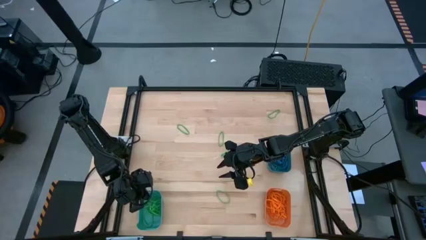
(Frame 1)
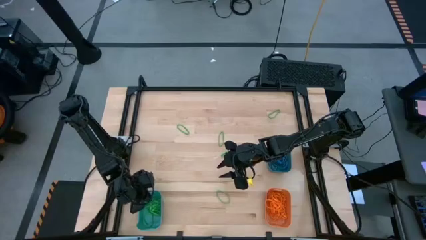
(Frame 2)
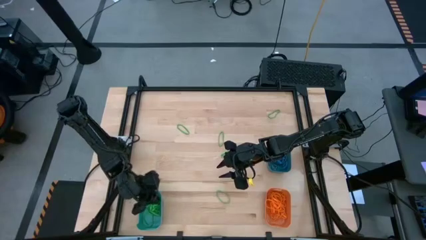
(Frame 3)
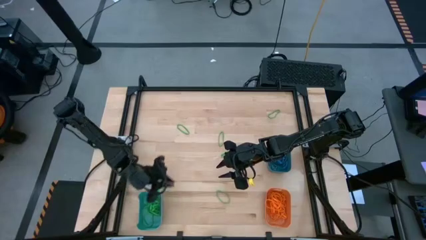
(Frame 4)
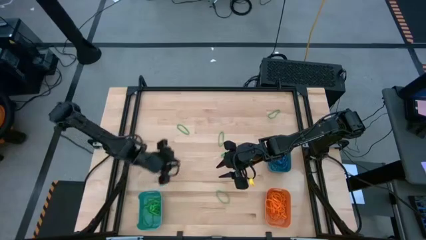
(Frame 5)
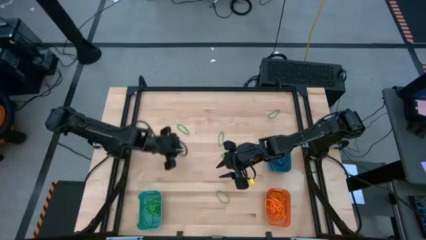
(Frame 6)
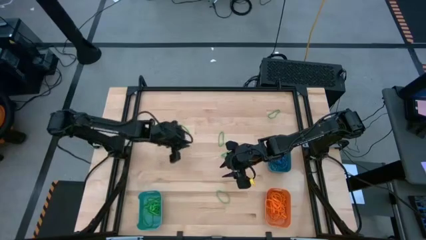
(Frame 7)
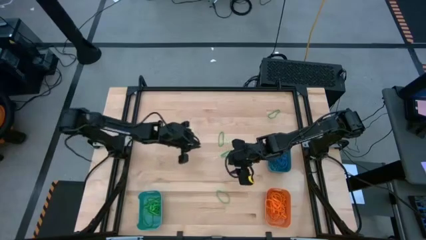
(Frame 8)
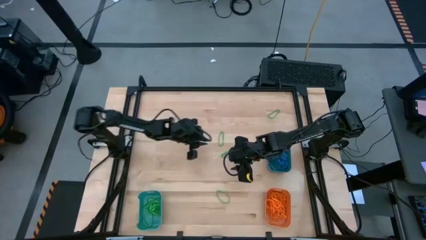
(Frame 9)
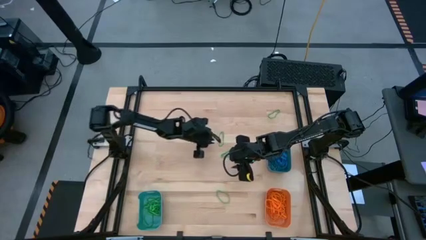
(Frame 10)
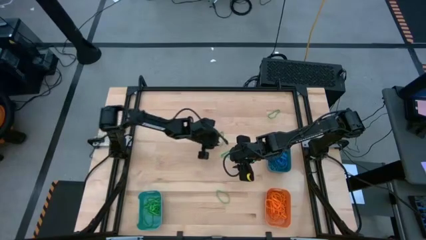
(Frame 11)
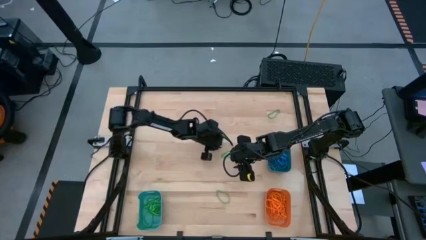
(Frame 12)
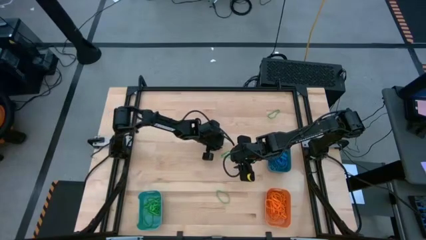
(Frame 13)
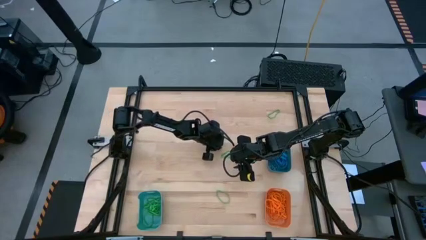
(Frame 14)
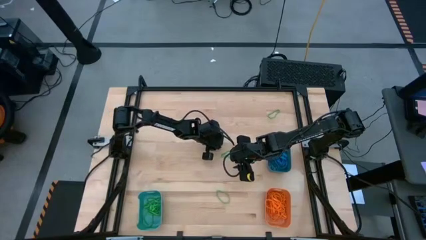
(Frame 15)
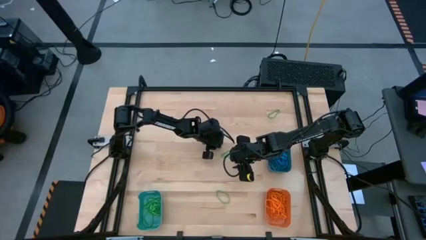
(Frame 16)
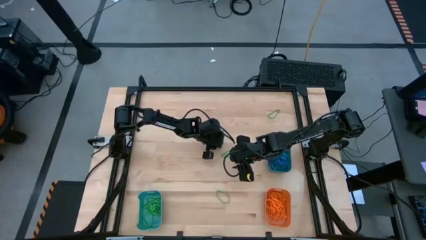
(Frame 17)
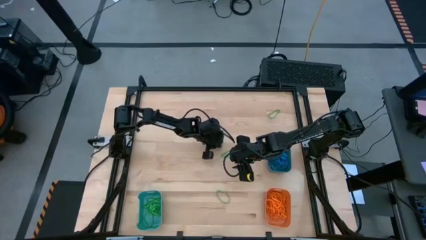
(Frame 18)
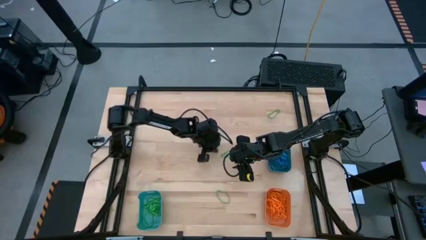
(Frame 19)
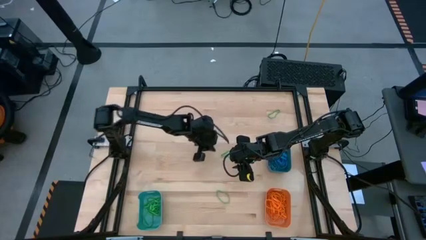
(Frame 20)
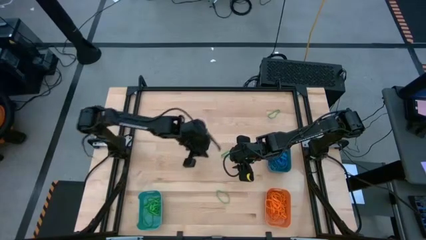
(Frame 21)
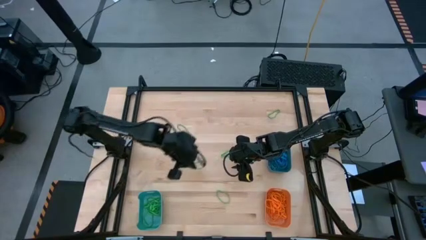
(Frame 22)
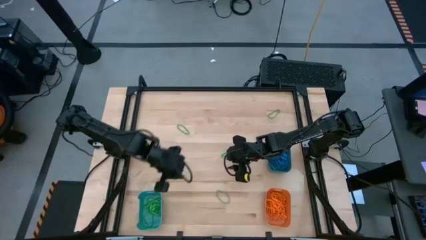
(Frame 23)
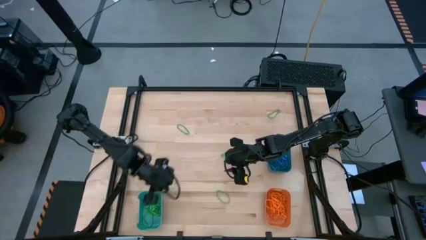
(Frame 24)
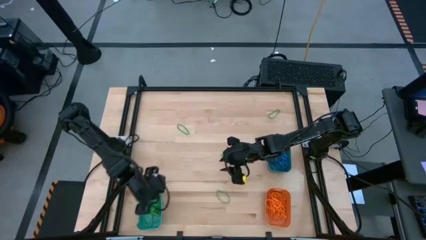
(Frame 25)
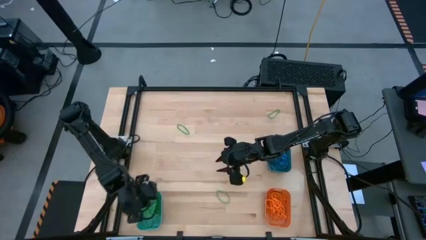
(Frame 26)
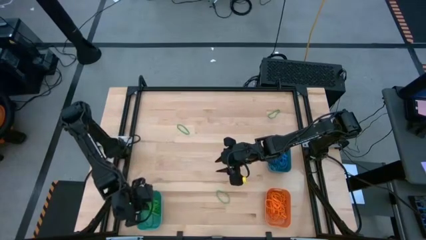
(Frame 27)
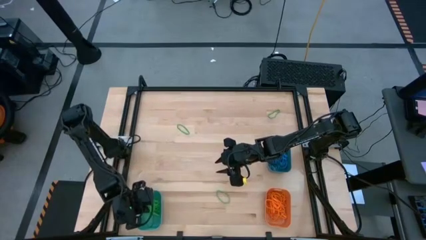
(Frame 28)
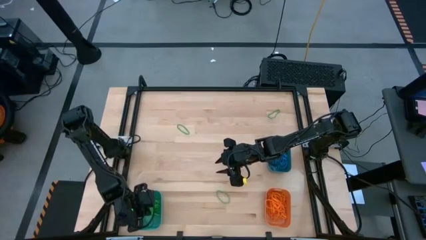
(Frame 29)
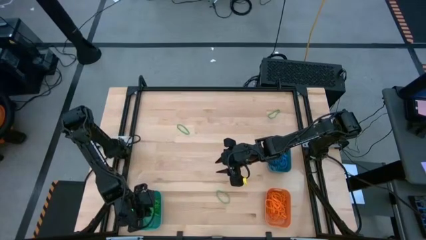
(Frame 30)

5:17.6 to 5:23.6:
Task: Sort rubber bands into baskets
Put the green rubber band into the green bin

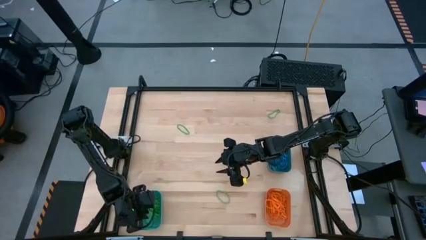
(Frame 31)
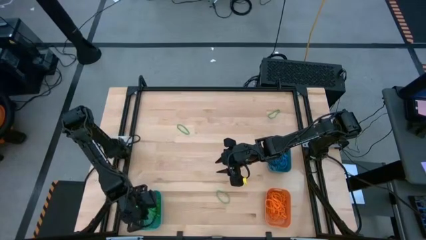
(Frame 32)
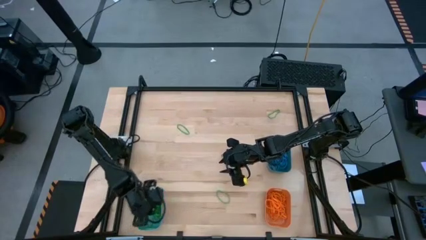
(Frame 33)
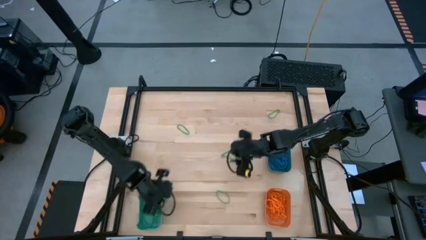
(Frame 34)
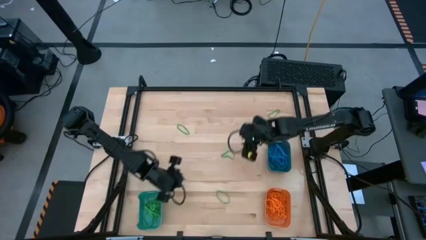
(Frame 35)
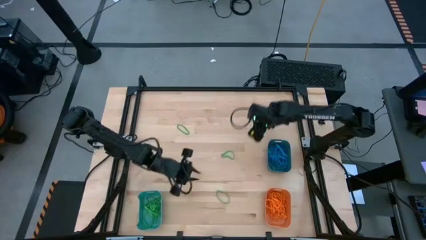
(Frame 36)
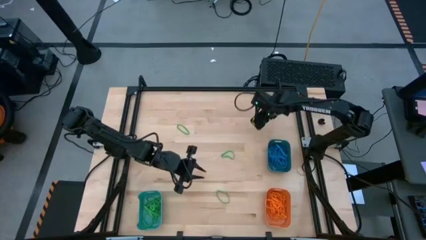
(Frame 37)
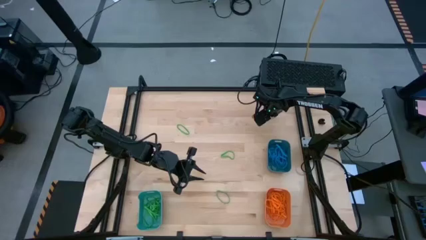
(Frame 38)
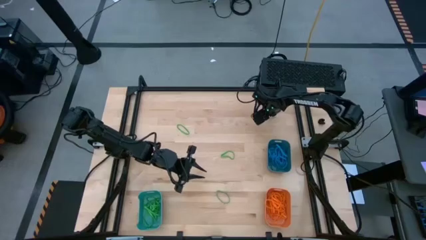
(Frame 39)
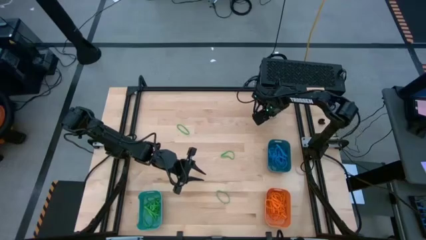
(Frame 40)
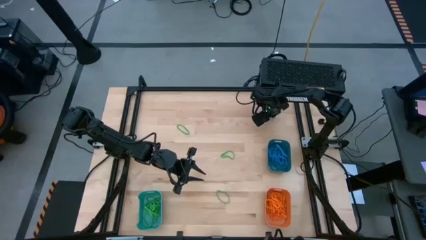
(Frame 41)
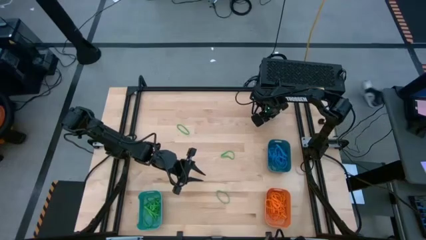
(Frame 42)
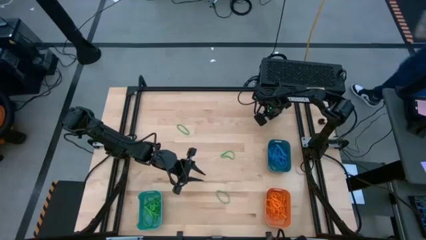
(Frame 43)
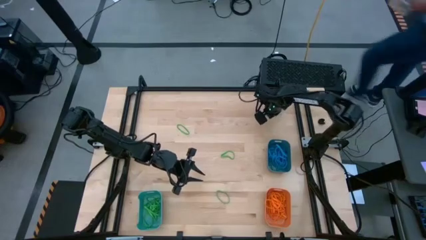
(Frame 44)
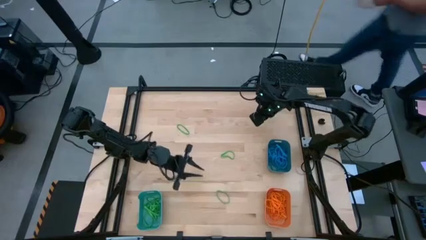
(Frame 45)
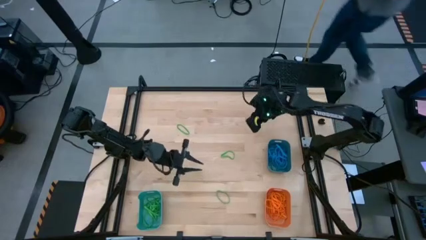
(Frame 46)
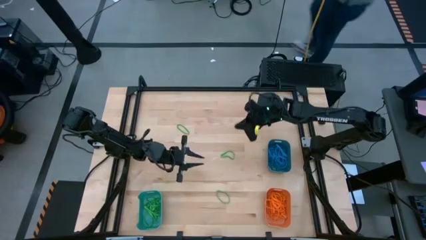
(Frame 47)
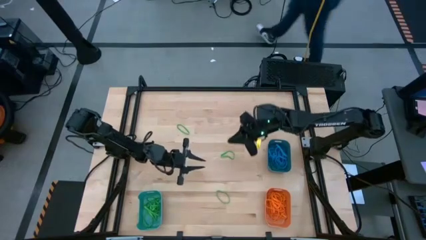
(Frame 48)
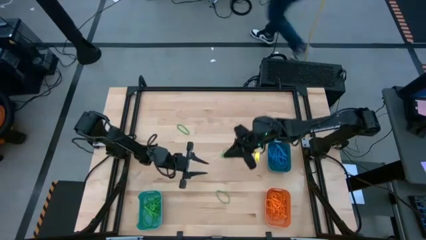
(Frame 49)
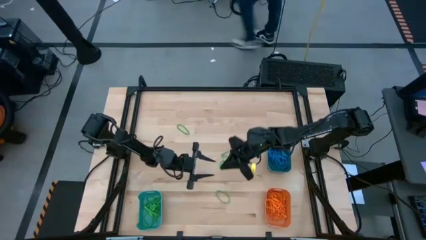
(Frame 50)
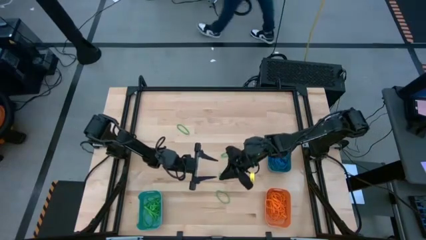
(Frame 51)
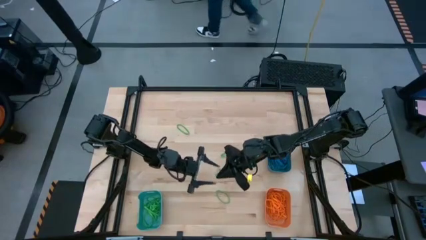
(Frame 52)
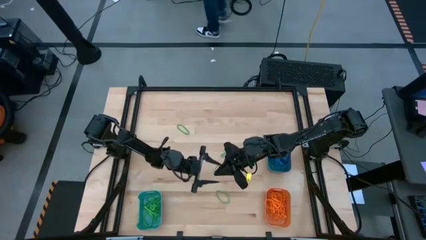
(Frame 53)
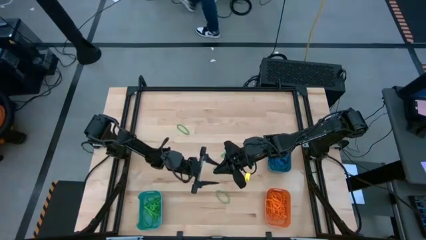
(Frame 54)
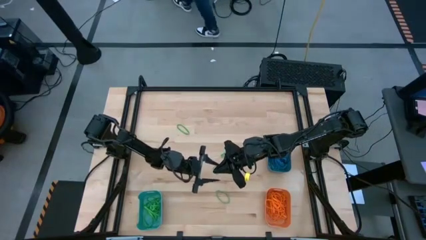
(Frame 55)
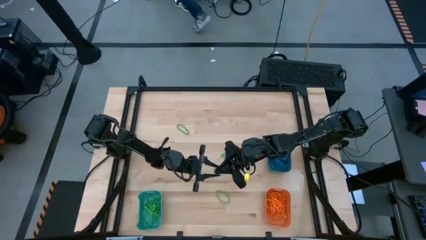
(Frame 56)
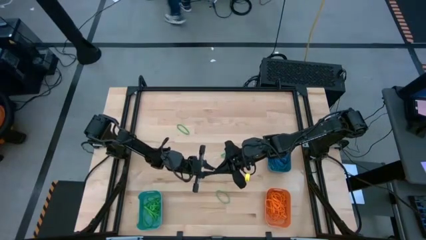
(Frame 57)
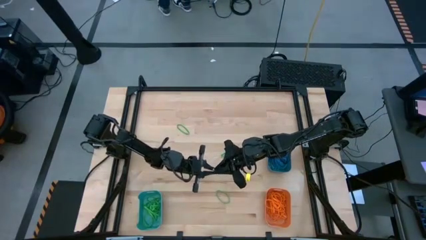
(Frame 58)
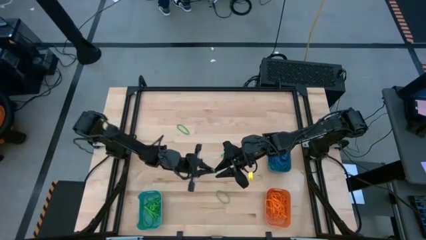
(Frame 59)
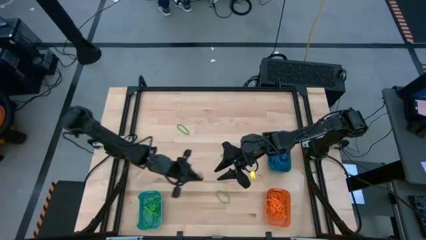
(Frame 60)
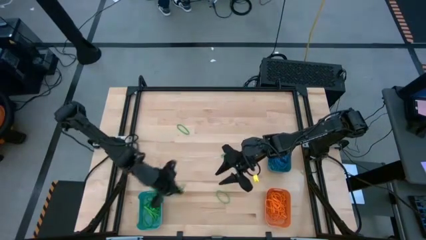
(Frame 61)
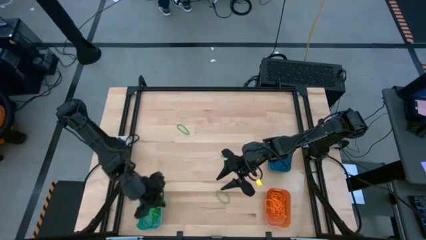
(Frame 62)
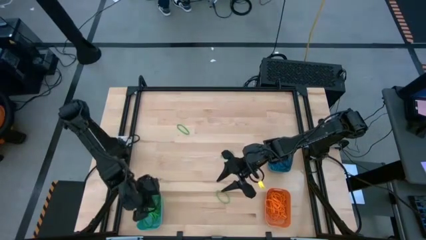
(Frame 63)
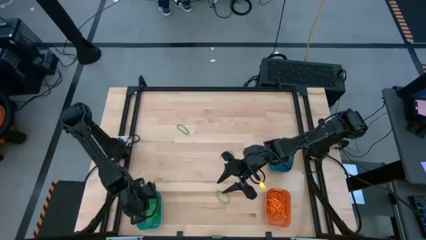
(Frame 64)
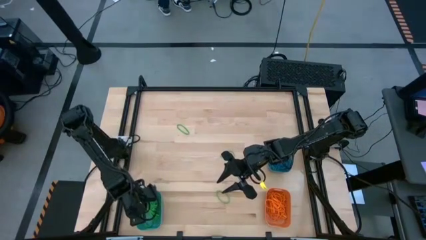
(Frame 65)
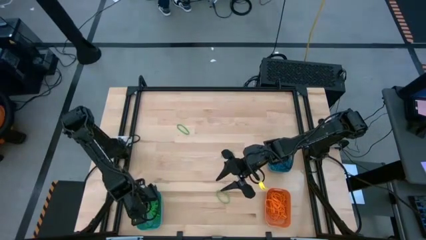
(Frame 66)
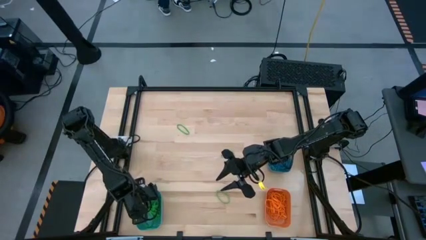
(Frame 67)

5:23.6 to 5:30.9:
Put the green rubber band into the green bin

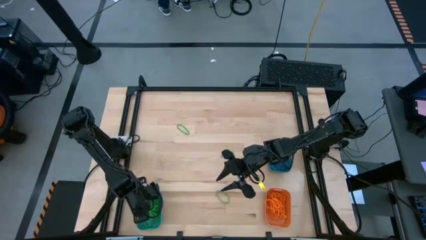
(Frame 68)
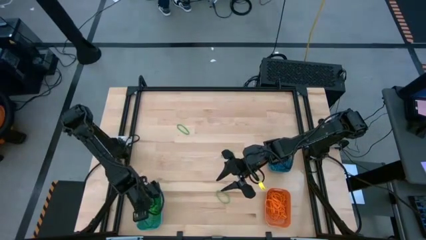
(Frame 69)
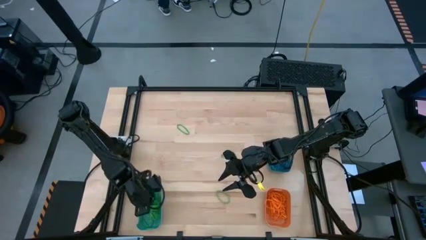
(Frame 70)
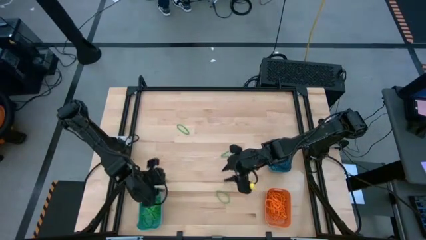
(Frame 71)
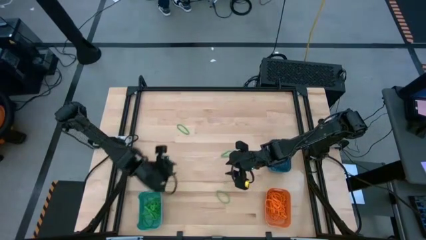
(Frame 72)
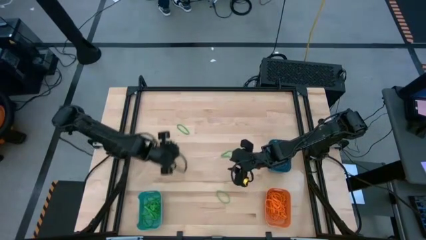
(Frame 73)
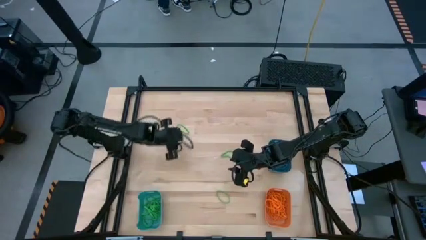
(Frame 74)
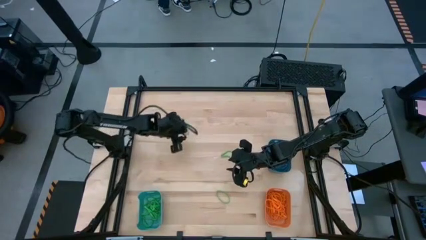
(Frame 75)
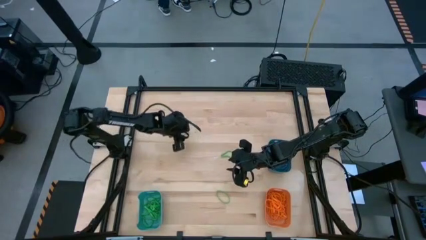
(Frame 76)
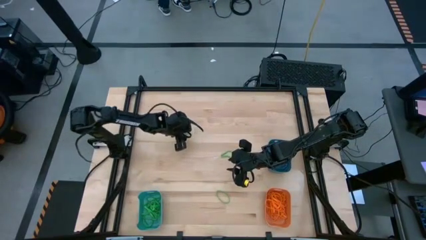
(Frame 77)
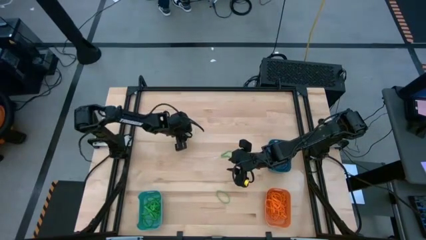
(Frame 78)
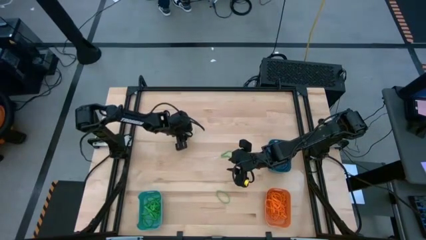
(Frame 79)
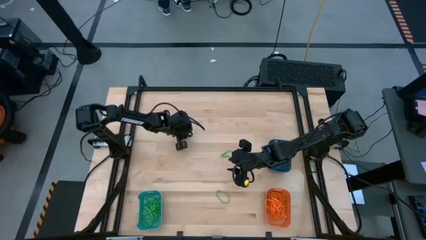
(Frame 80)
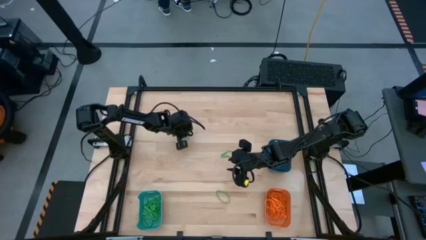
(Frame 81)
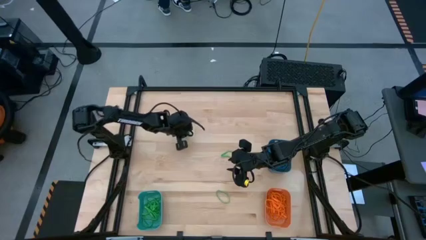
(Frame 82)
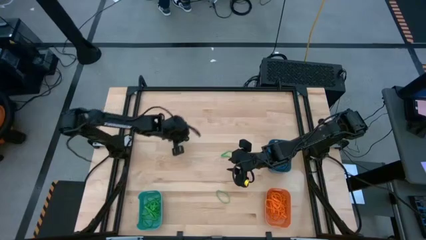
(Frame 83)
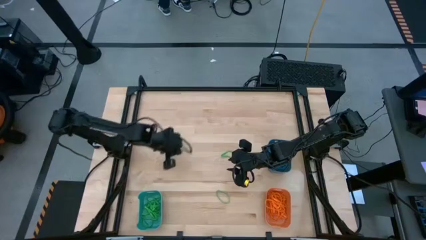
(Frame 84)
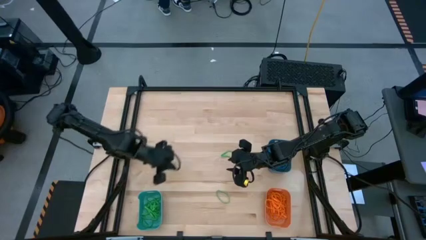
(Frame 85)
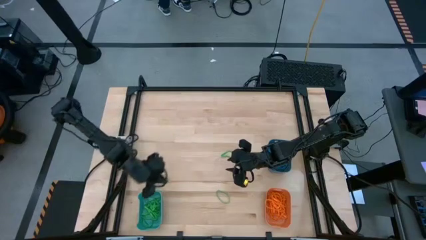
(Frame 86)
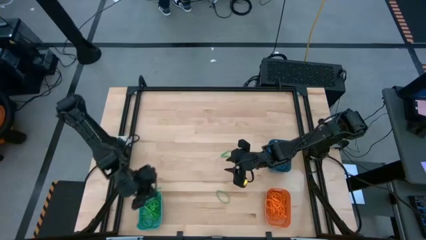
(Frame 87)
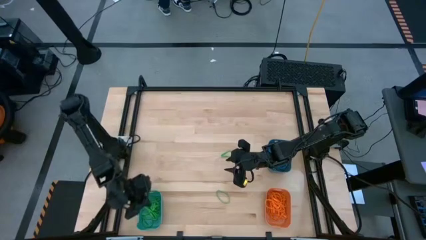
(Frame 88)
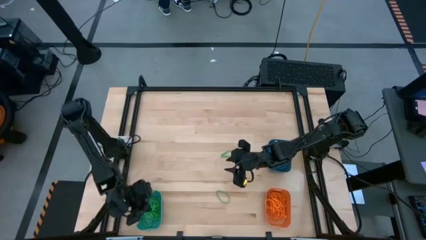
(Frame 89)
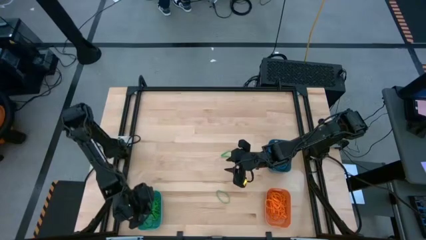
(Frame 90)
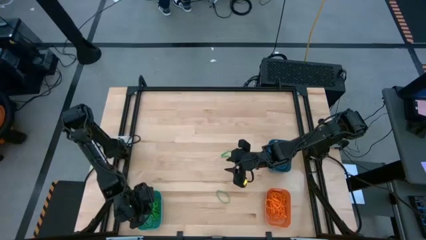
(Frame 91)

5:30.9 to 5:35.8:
Put the green rubber band into the green bin
